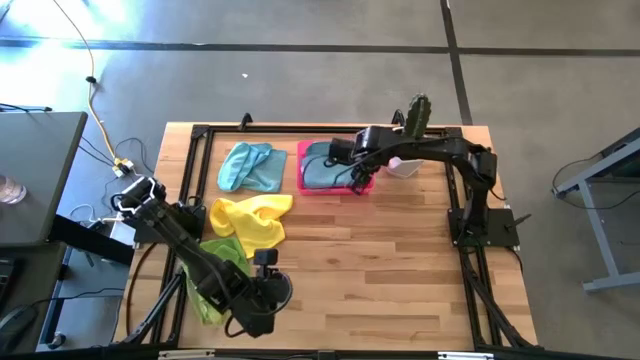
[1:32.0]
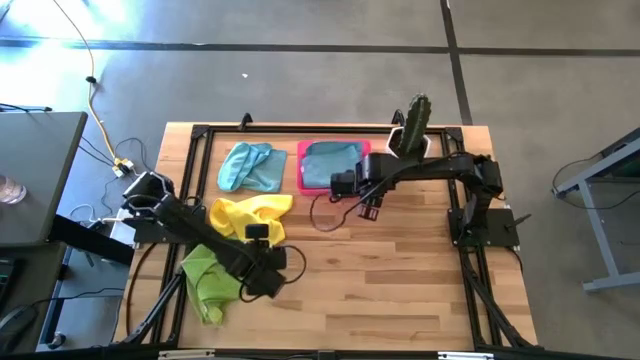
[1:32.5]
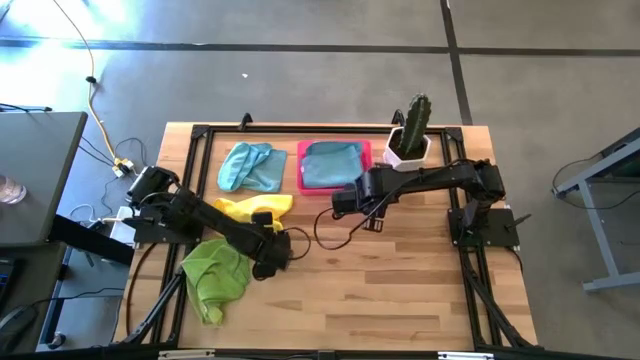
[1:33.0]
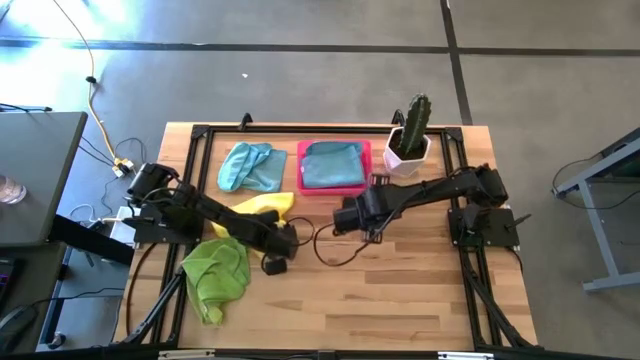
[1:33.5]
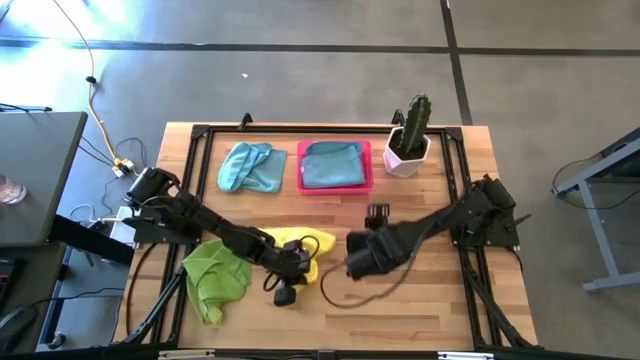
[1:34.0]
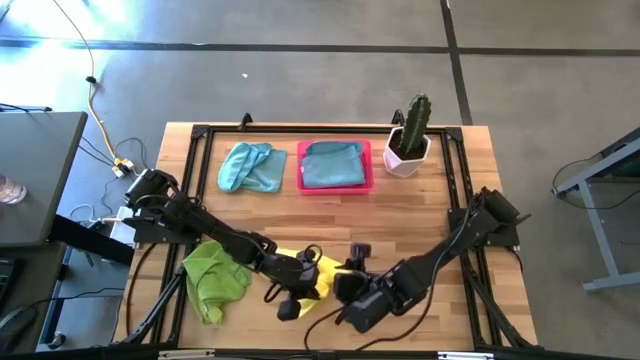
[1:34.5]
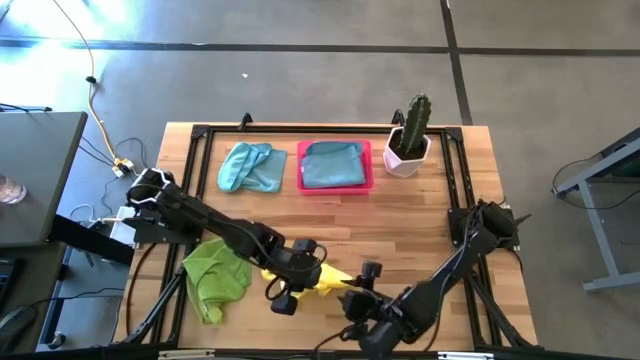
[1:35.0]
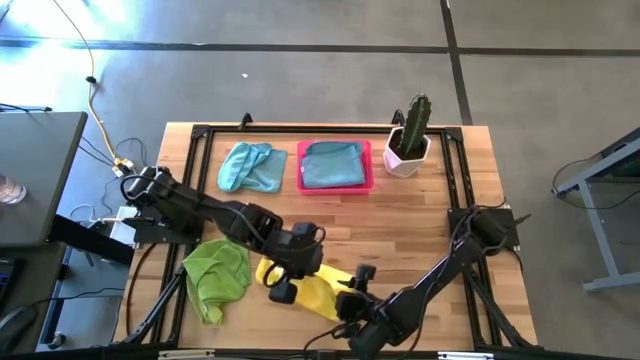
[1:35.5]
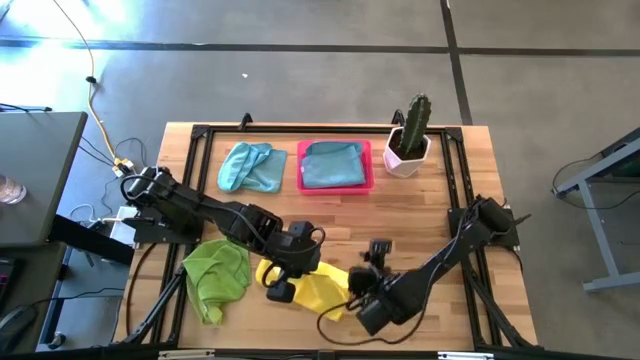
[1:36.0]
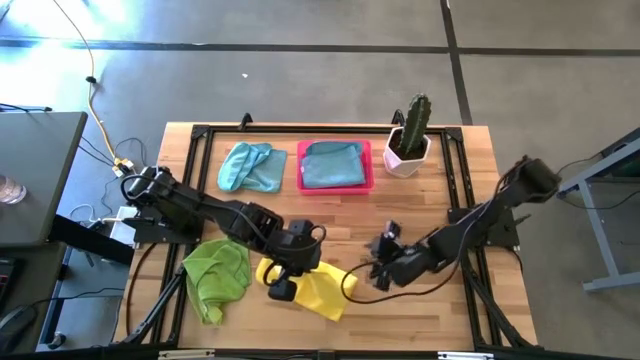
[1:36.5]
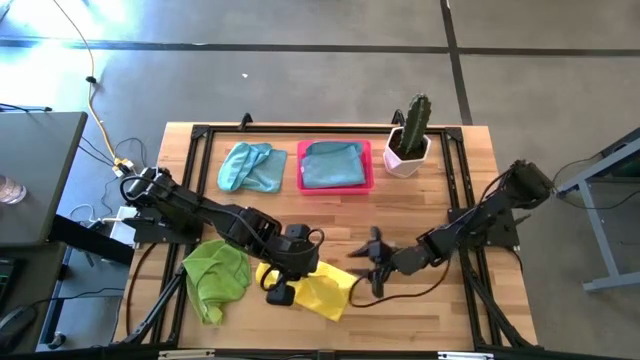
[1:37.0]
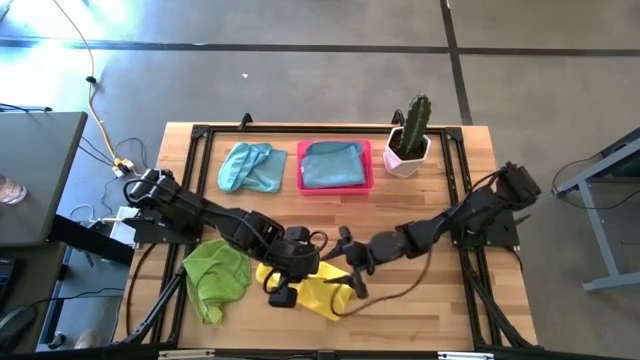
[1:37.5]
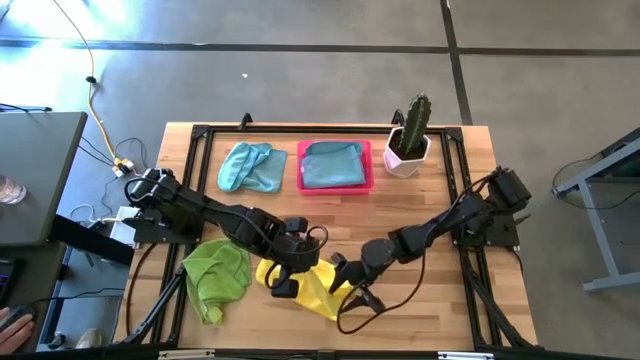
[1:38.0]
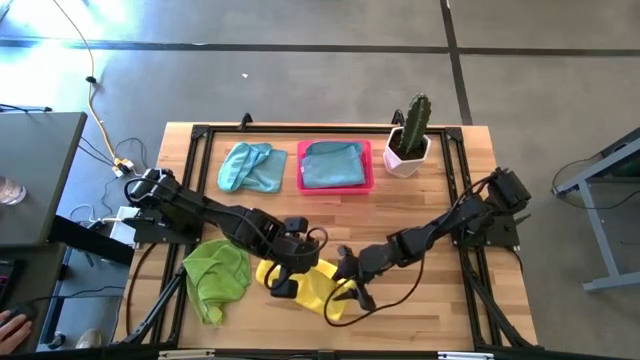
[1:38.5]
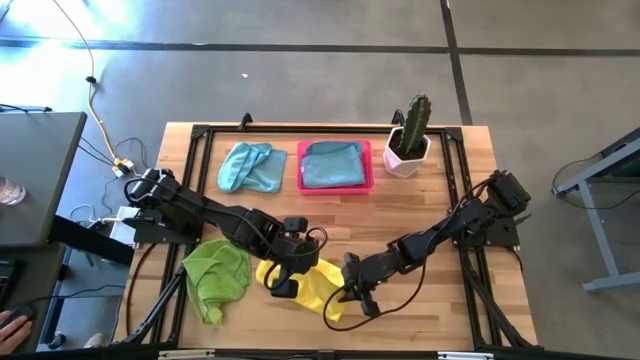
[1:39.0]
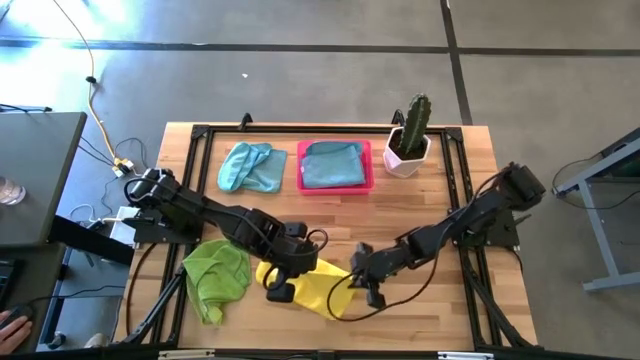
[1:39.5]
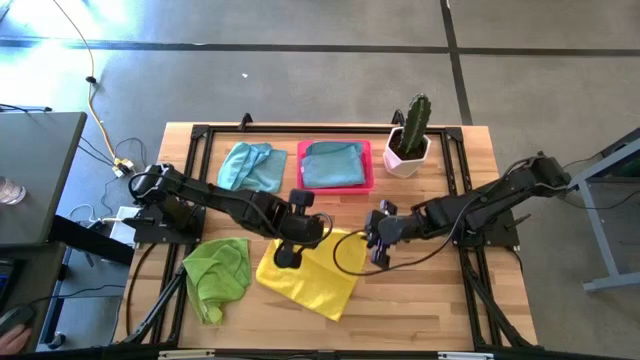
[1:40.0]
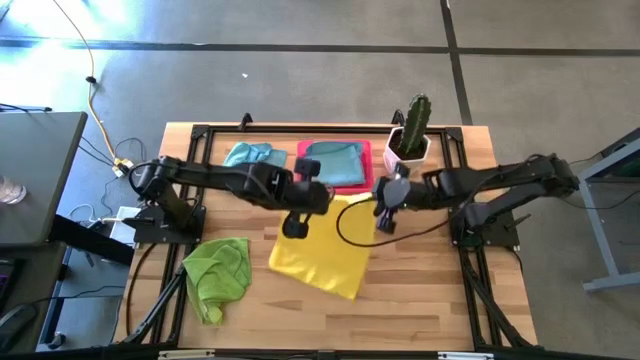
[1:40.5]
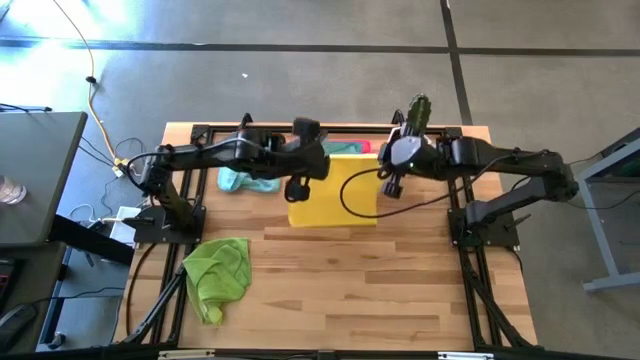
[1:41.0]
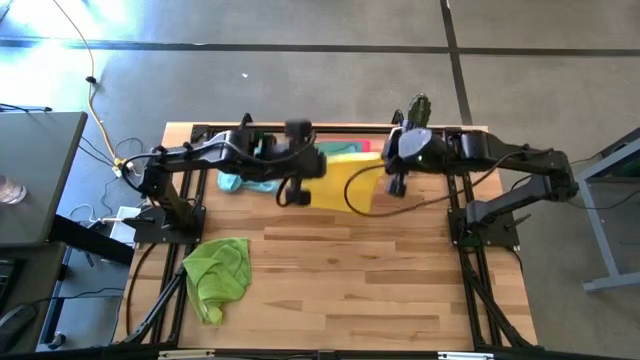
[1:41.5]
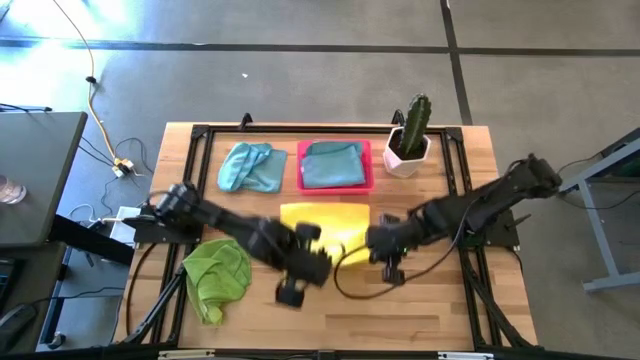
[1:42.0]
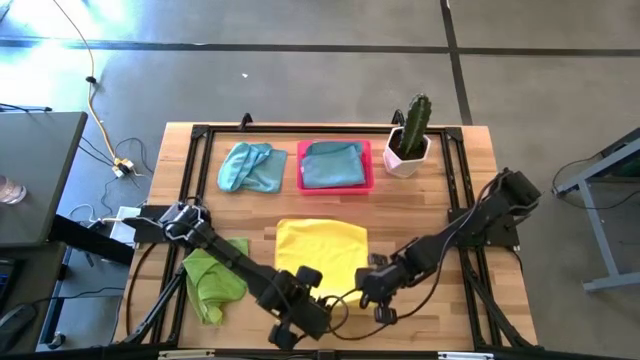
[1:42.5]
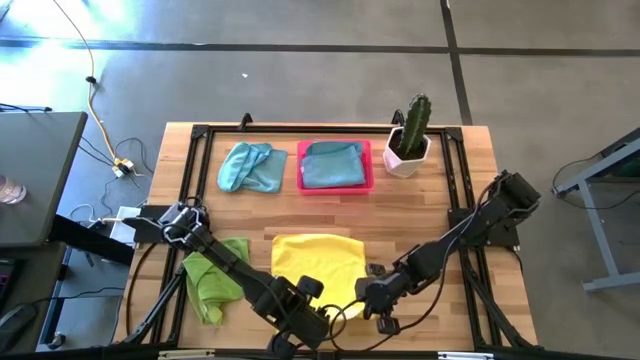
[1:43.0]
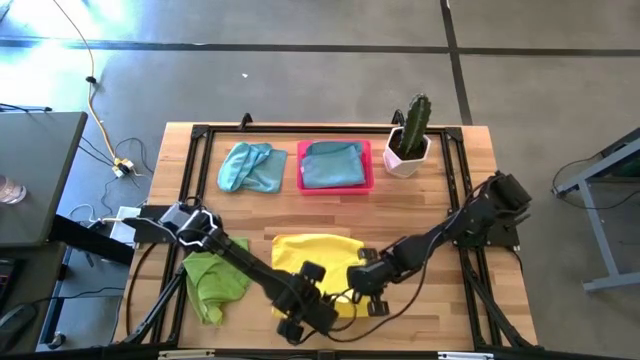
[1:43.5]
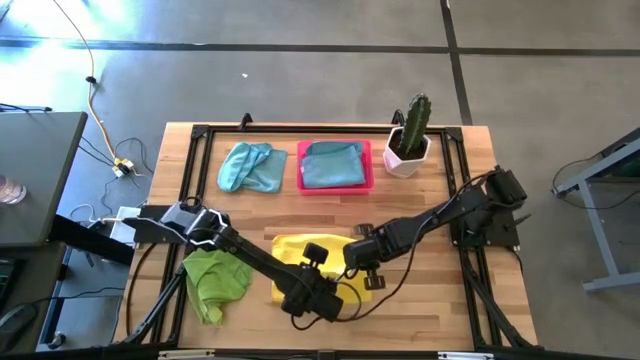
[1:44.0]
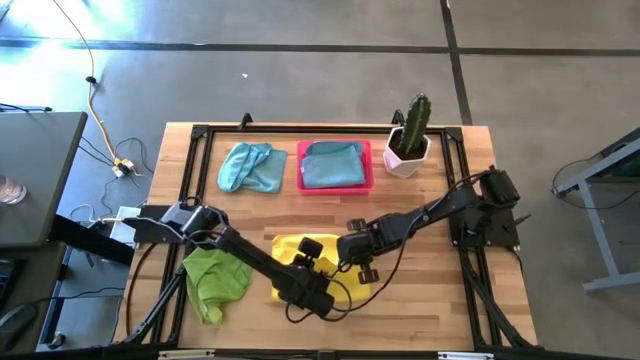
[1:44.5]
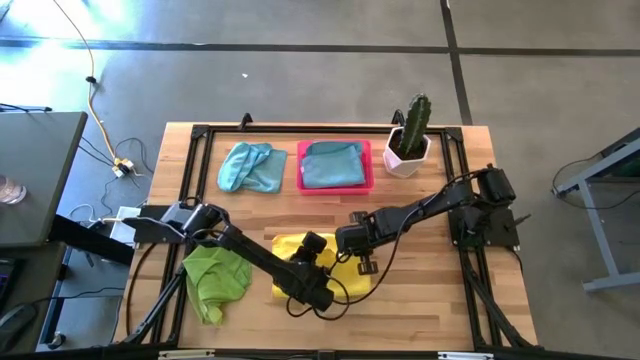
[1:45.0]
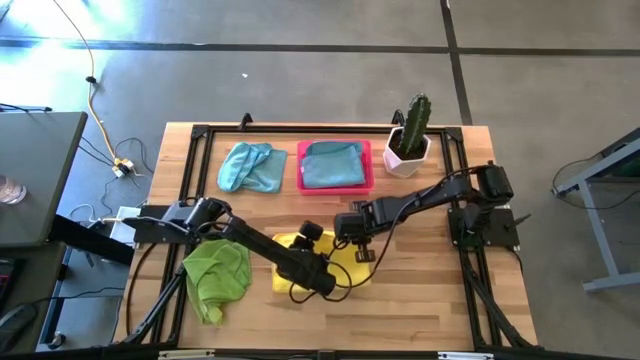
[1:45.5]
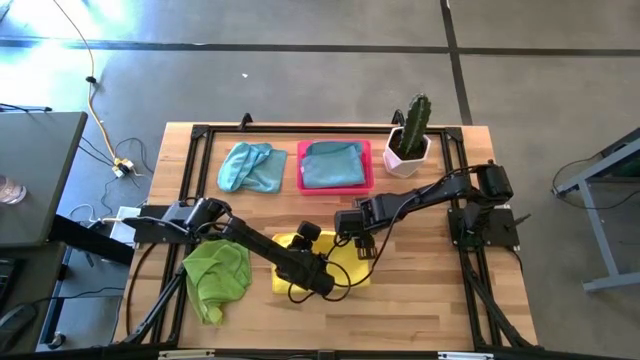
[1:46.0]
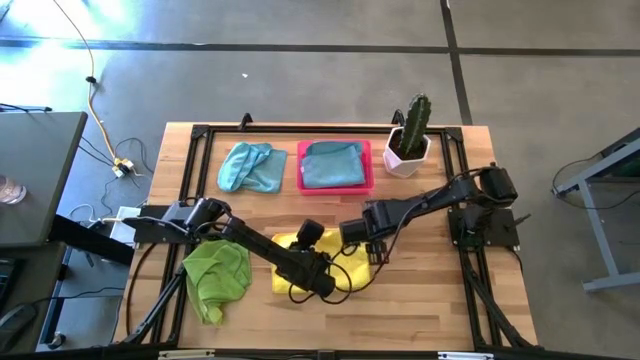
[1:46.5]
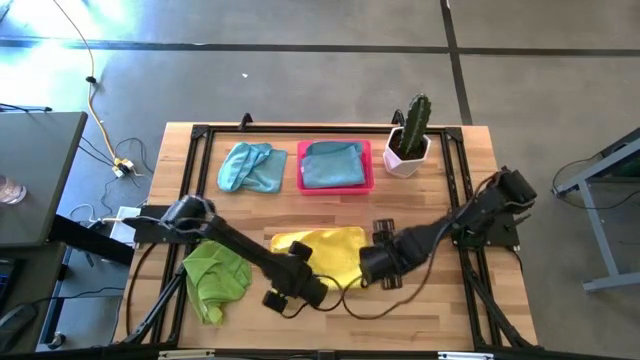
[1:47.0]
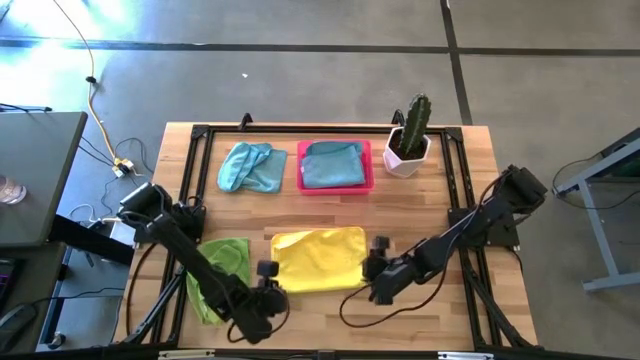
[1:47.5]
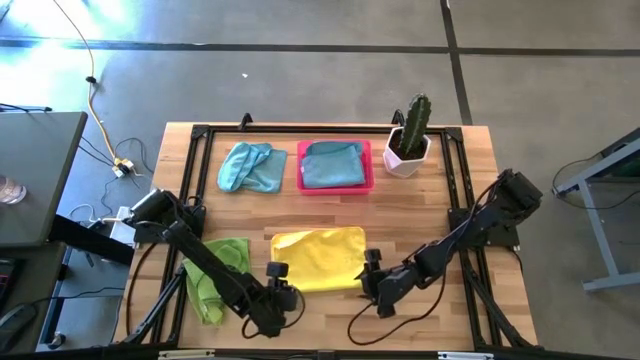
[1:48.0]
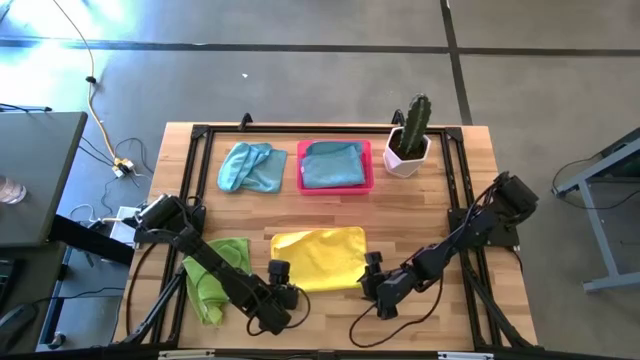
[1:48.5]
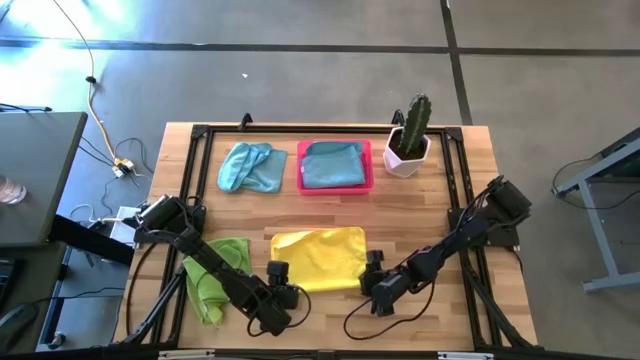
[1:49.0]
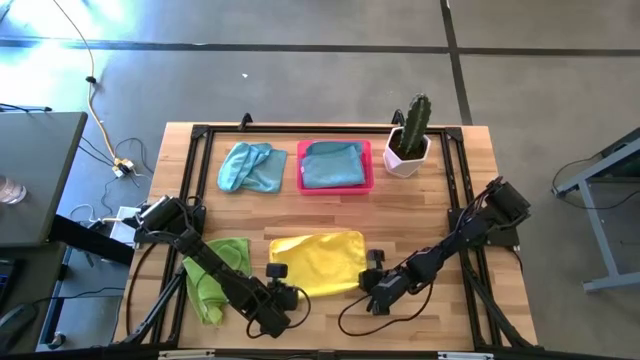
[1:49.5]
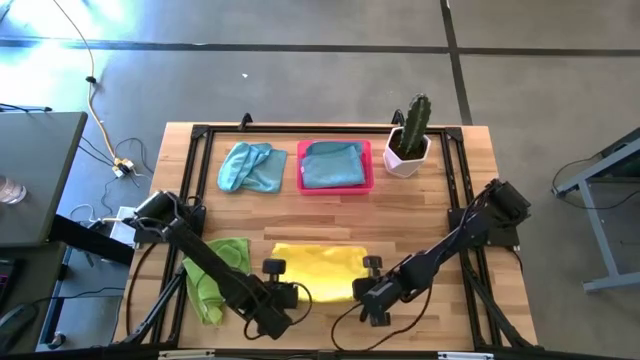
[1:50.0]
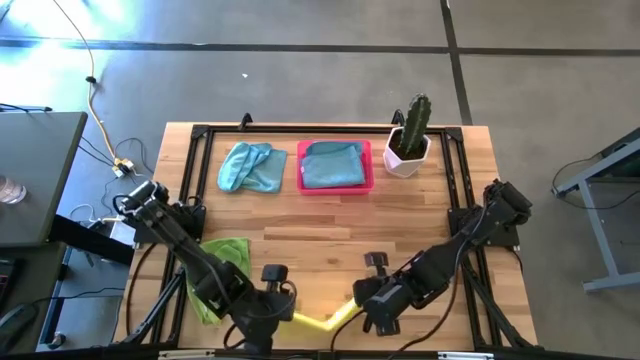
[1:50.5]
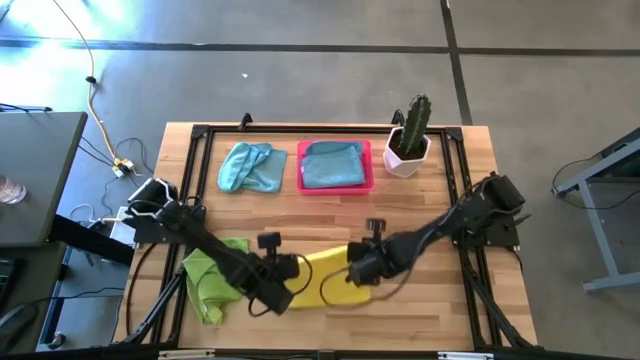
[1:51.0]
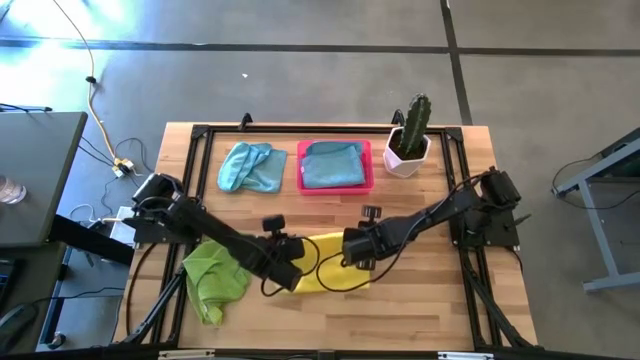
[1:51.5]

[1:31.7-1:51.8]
Task: Fold microfiber towels
Fold the yellow microfiber cloth
